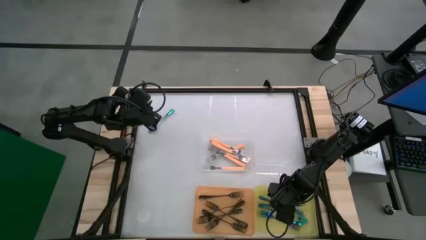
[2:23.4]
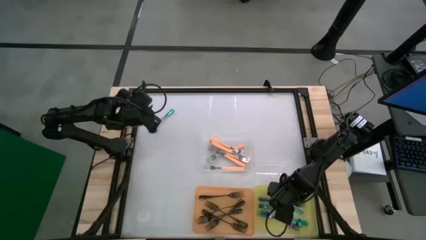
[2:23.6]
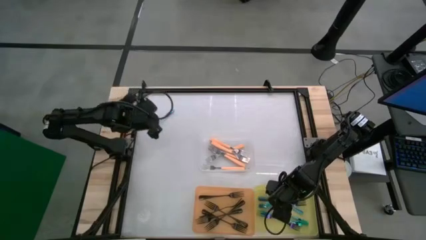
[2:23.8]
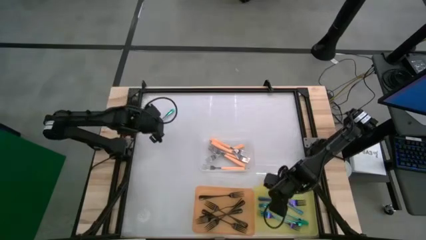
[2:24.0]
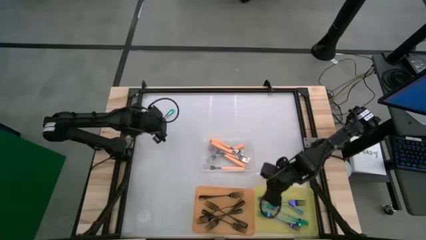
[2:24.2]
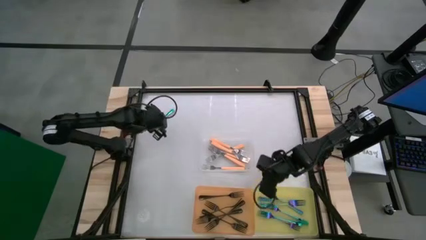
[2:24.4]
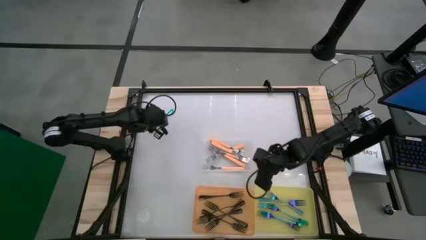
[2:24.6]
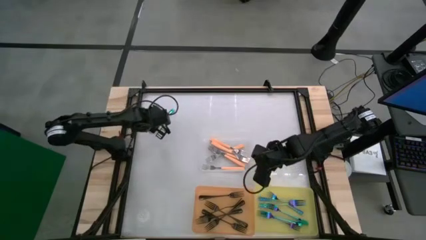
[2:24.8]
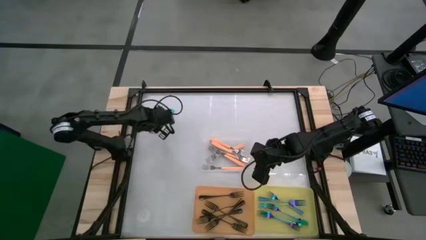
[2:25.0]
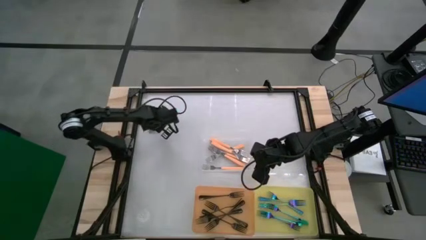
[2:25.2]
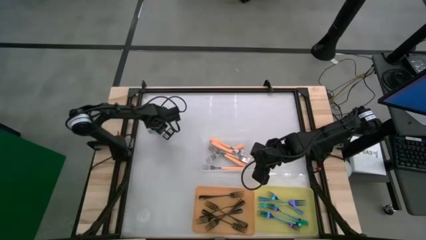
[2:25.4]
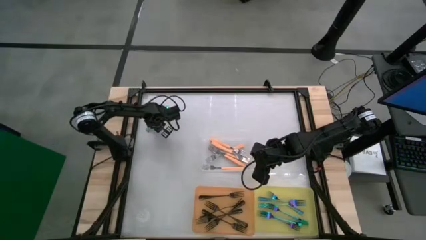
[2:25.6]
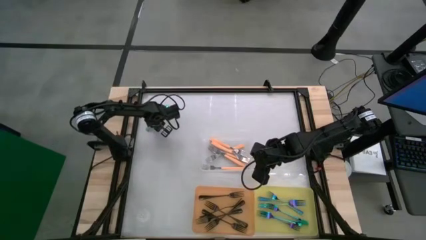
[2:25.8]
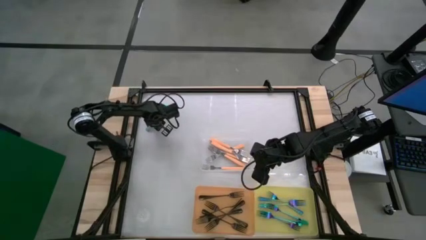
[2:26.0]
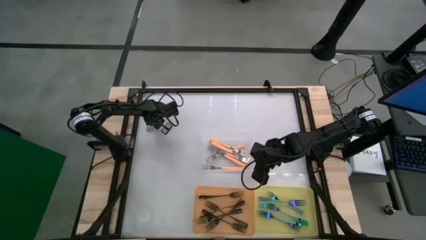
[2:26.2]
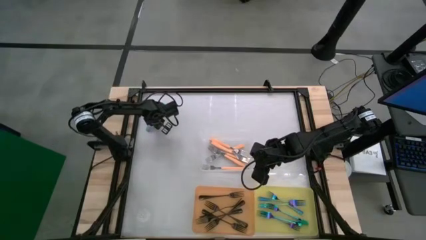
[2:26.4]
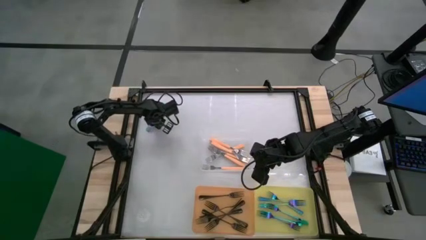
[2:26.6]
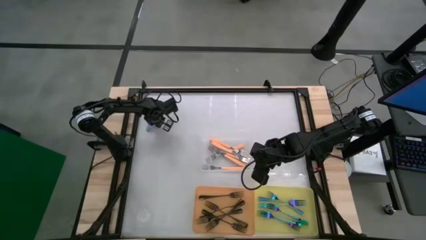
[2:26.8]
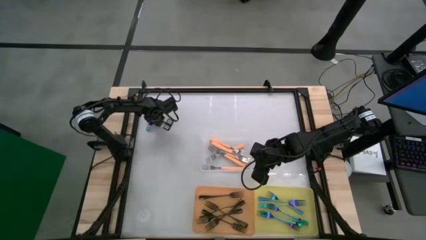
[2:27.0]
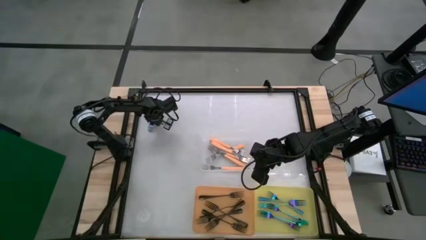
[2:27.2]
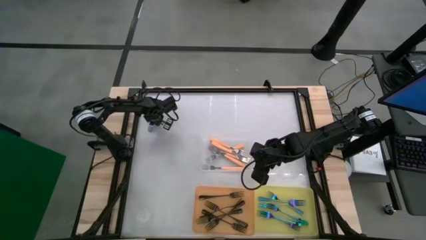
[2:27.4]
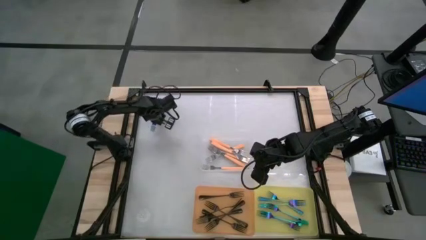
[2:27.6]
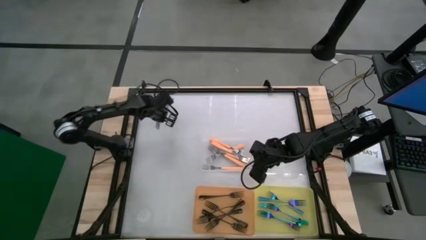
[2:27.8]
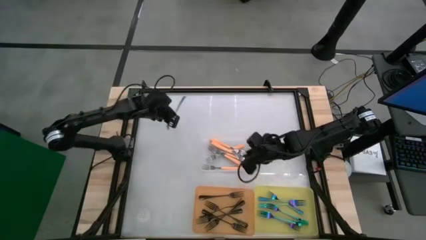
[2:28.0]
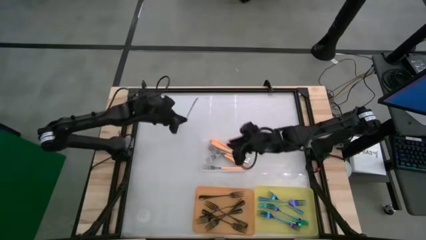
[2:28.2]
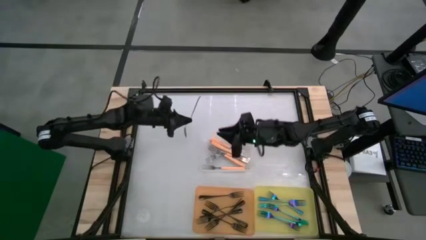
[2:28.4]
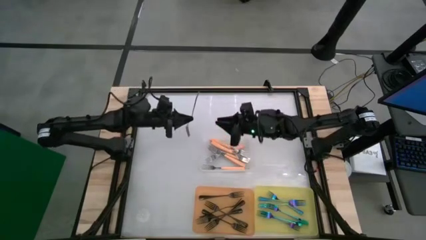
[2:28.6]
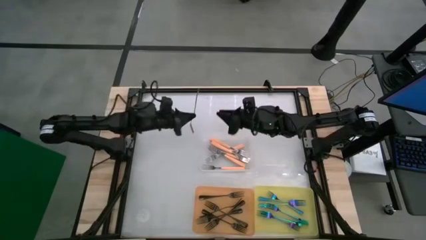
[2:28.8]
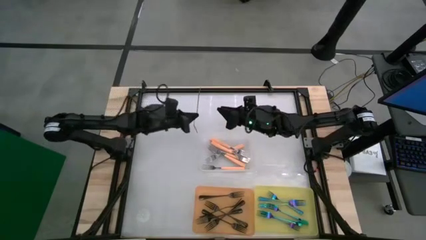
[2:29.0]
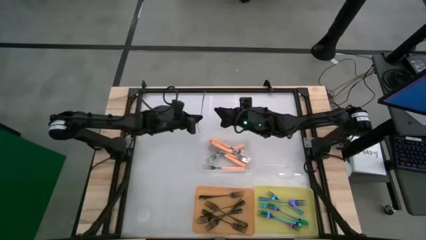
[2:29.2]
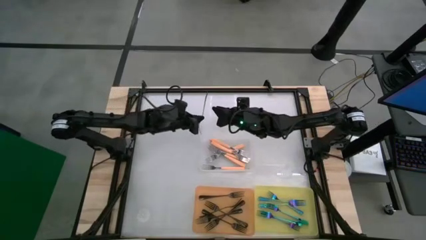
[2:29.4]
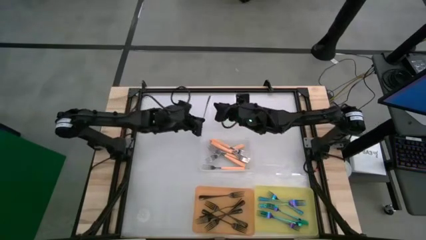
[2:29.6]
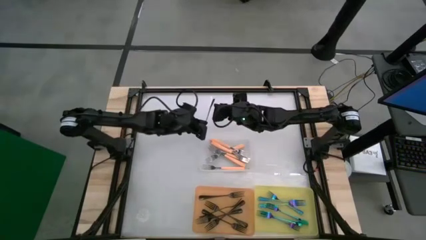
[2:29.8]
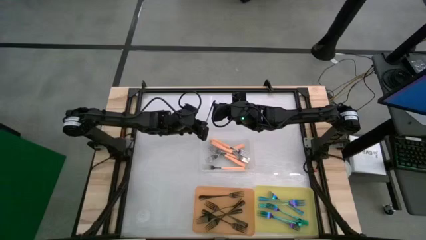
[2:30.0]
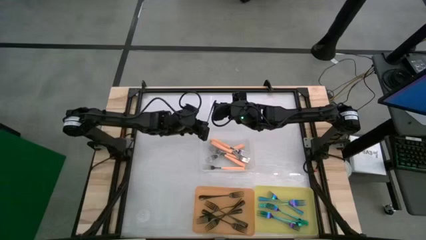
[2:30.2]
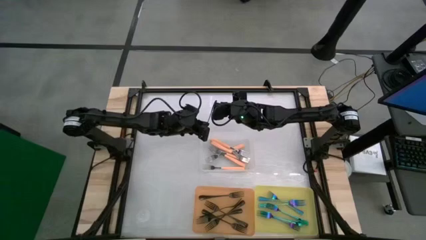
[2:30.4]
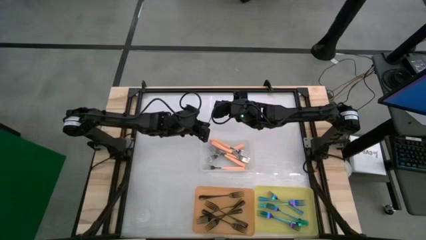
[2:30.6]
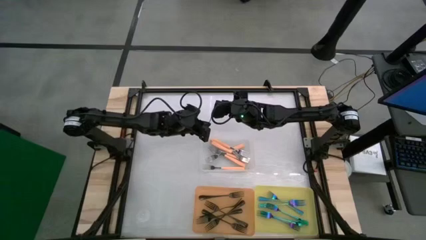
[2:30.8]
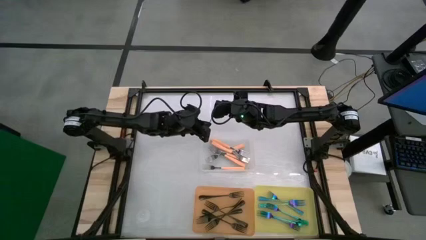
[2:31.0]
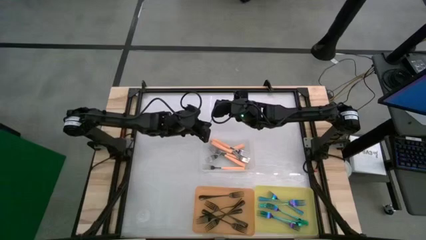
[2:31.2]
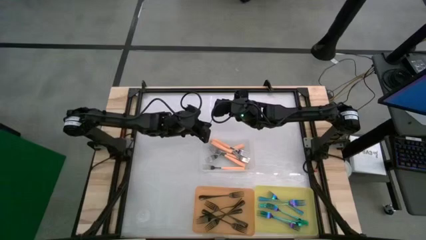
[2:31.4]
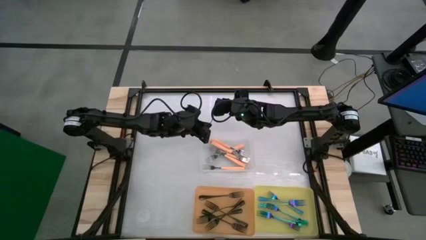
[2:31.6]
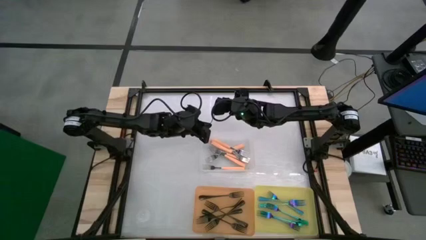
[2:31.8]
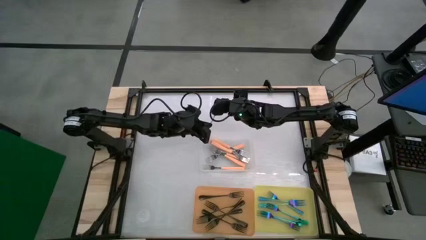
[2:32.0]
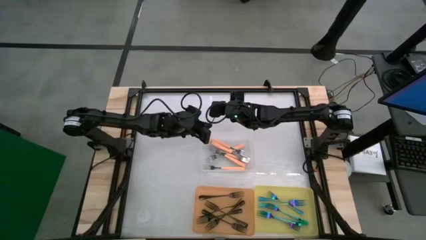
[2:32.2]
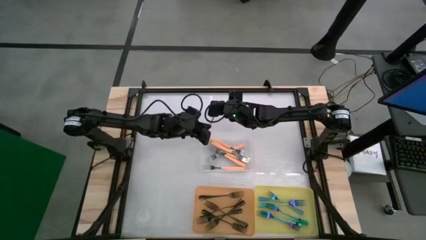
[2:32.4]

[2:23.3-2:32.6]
Task: Sort silverware by color (type)
Put the blue fork into the yellow bin

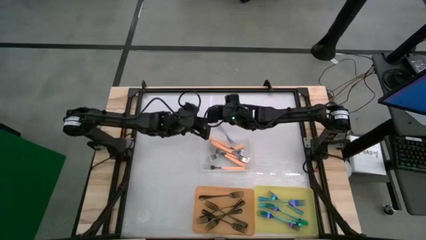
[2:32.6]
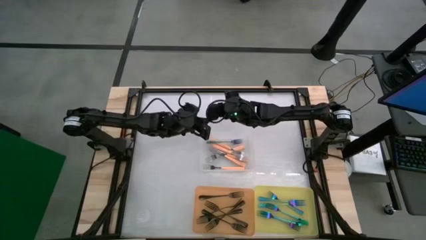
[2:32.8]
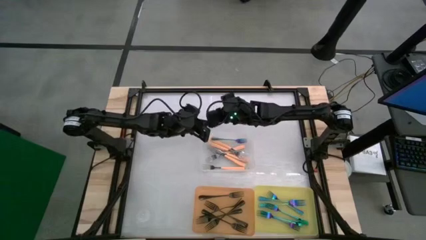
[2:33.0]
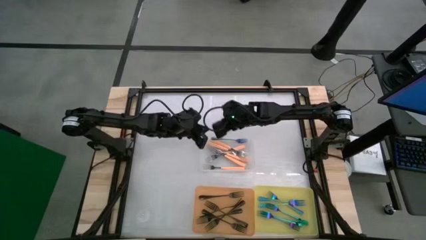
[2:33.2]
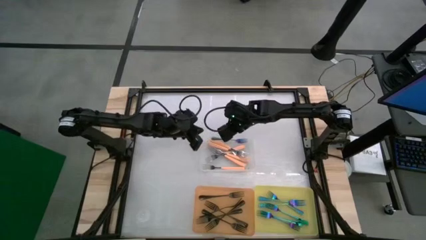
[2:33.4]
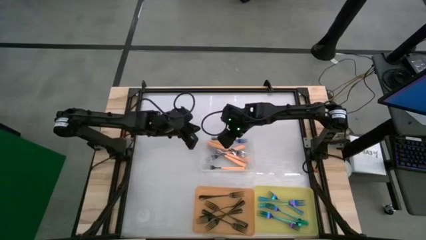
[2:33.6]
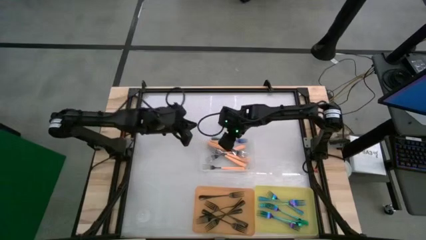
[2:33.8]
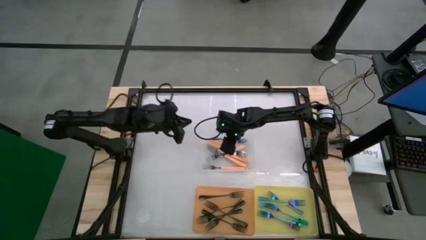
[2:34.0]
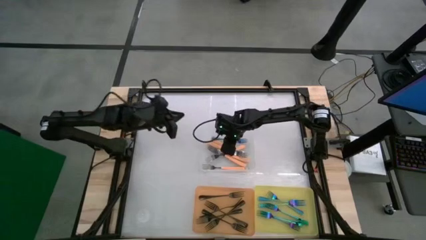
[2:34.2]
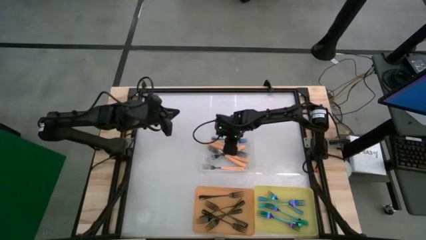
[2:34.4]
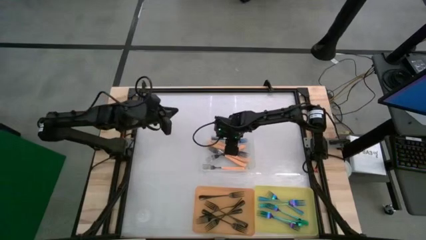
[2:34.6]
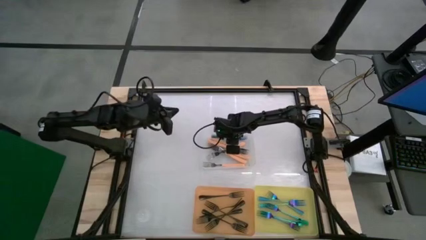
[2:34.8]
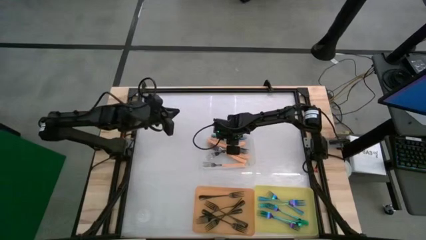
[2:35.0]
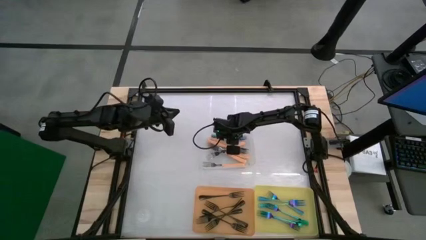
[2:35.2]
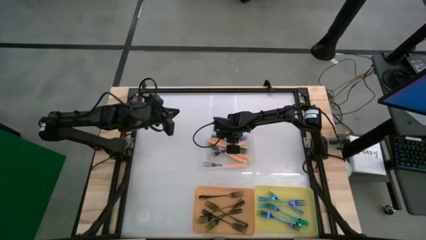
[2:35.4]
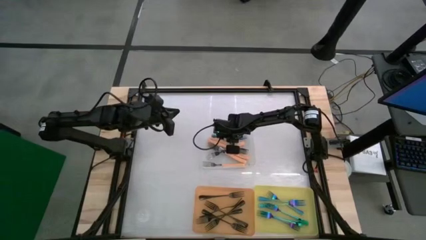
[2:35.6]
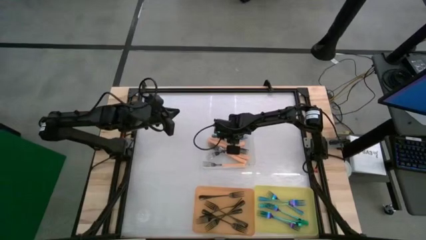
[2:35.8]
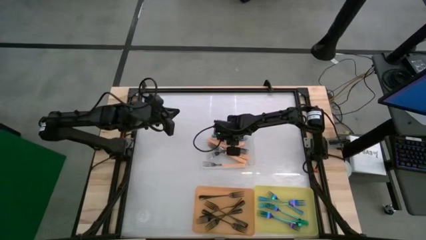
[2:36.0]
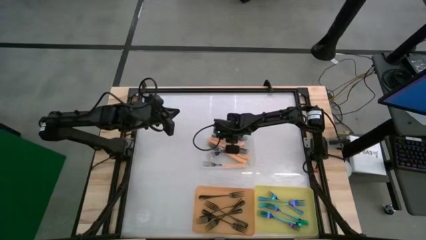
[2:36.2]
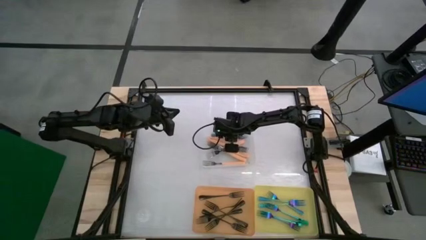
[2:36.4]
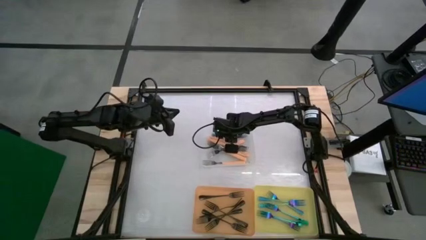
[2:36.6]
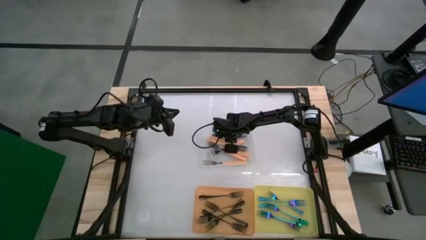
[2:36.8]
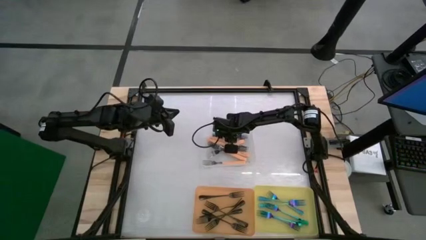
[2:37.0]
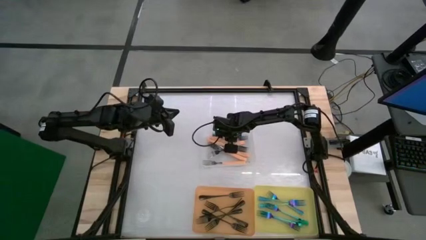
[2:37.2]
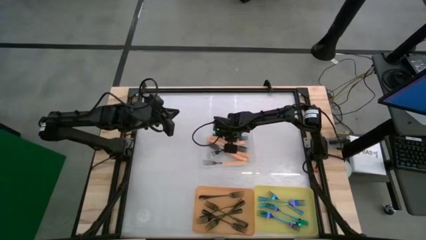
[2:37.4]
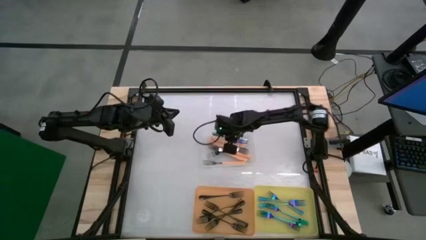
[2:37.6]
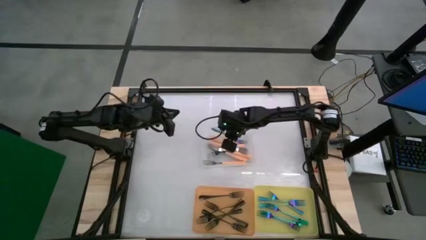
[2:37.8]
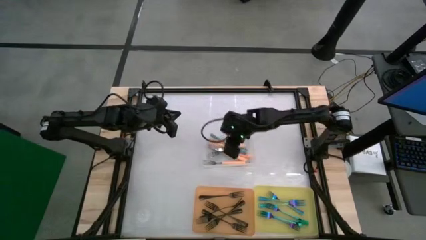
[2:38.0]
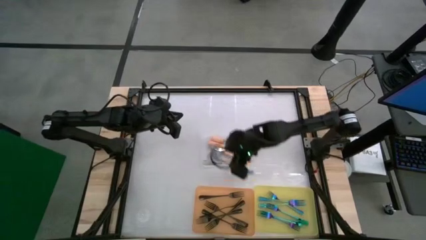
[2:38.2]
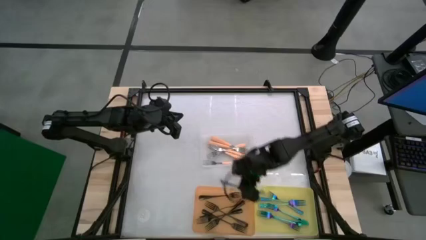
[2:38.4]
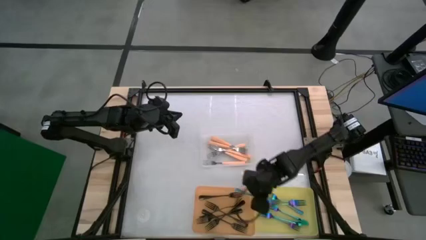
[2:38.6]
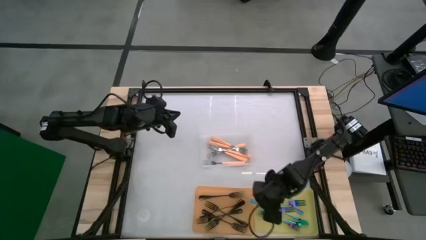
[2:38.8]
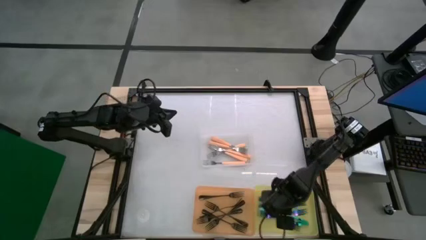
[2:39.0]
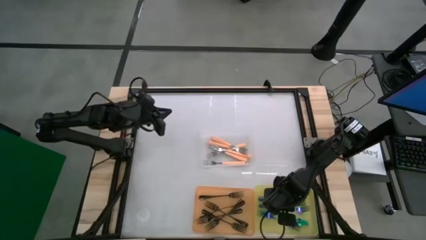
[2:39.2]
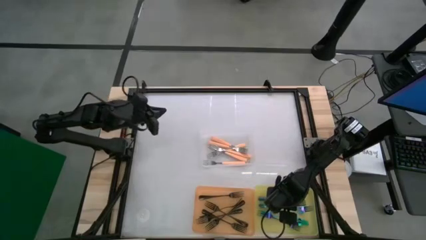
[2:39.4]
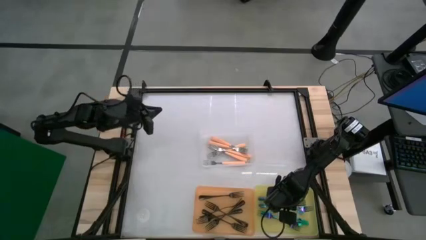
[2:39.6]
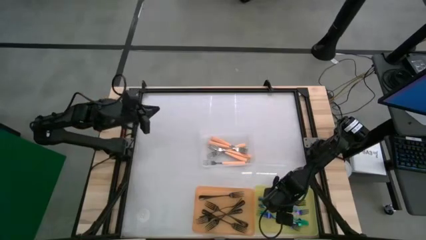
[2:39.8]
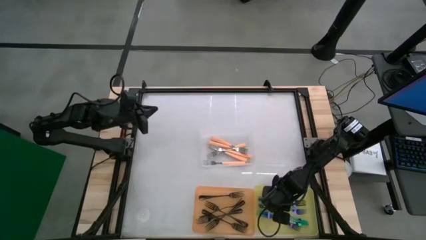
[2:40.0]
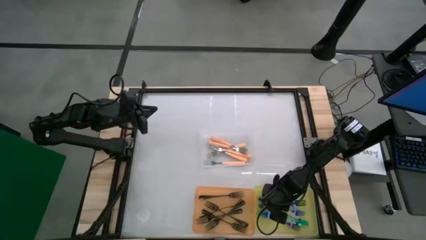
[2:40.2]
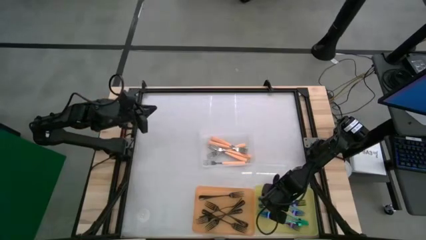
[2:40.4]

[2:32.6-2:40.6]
Put the blue fork into the yellow bin
